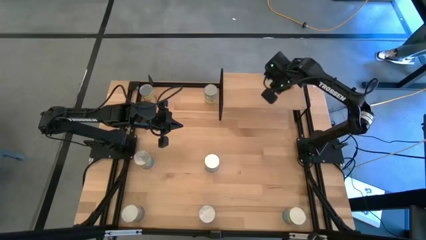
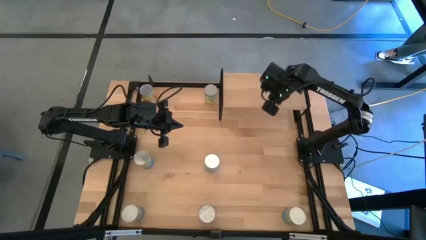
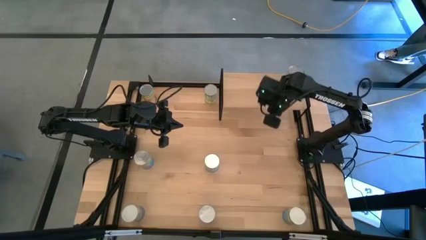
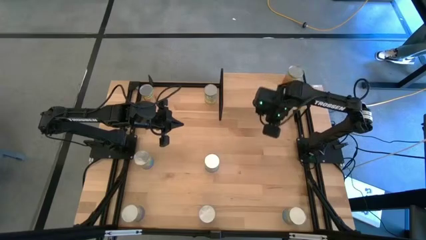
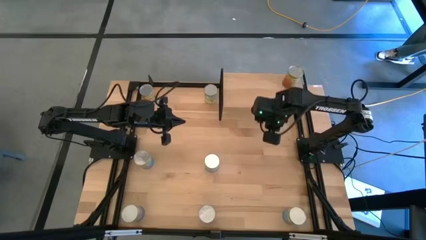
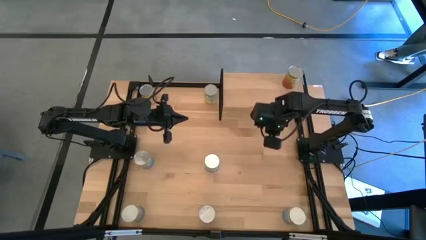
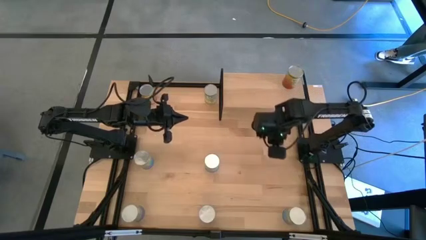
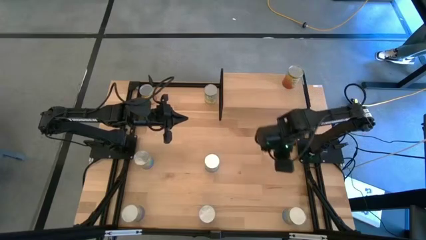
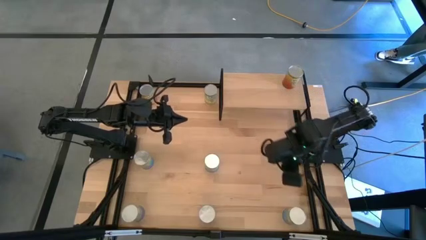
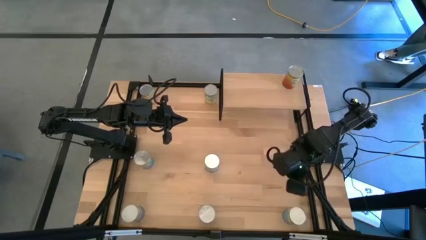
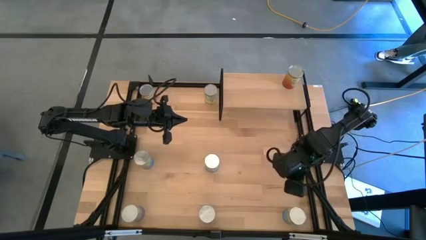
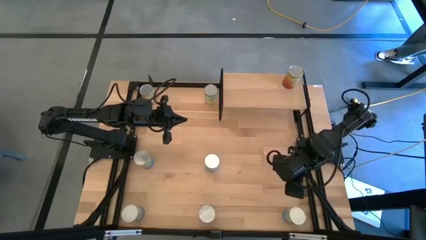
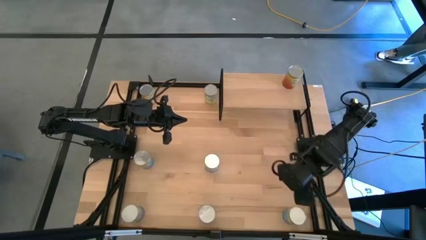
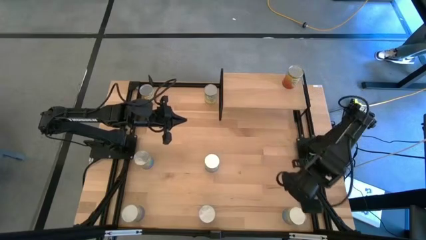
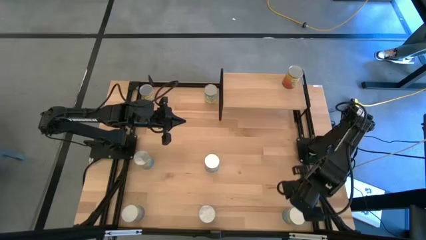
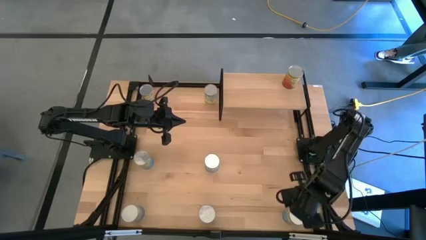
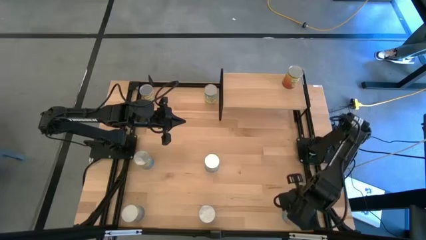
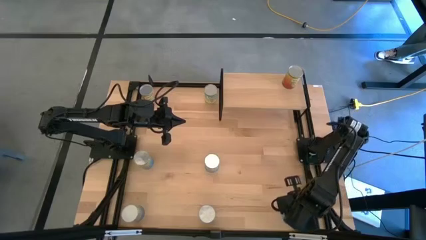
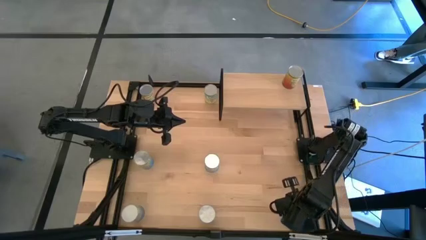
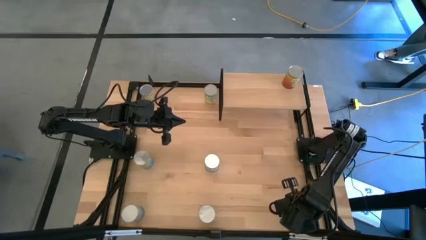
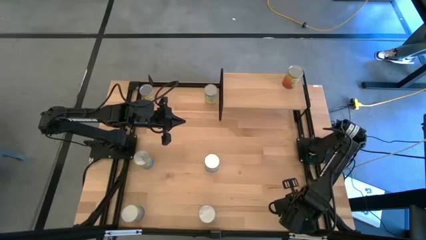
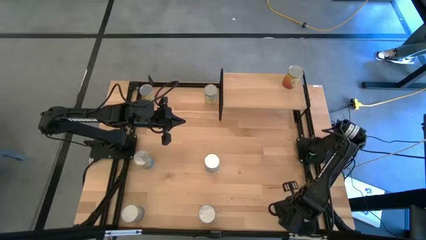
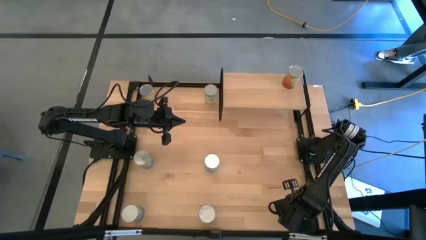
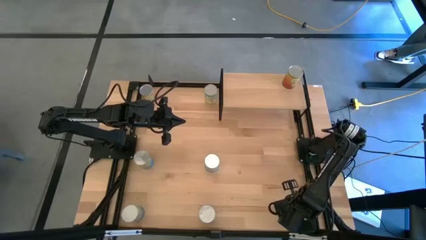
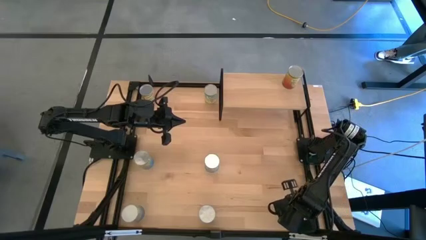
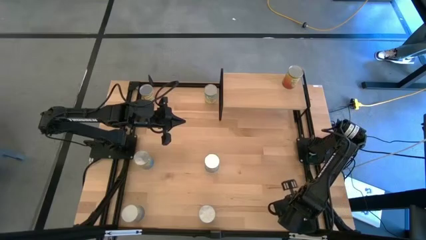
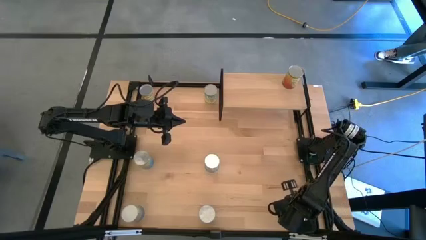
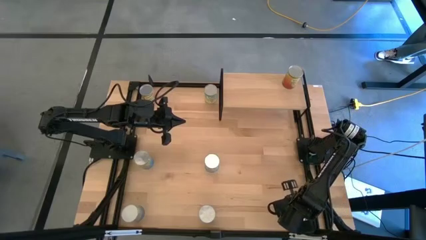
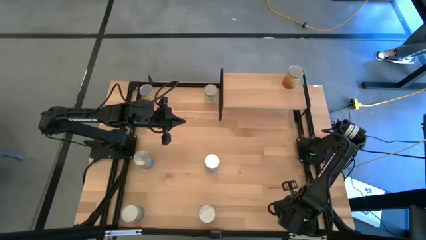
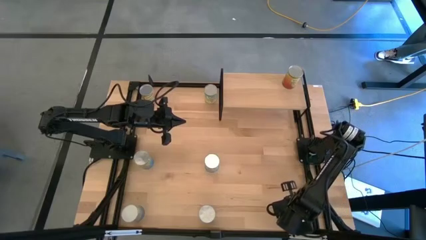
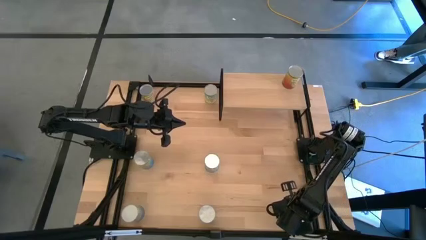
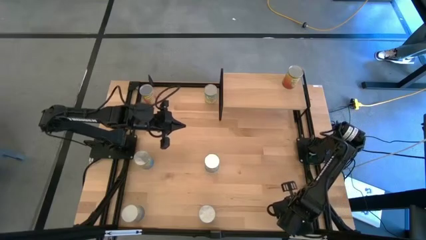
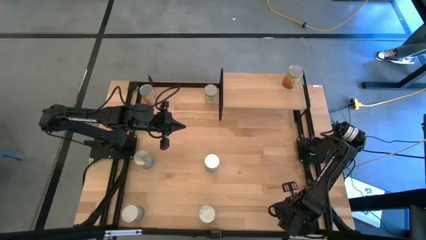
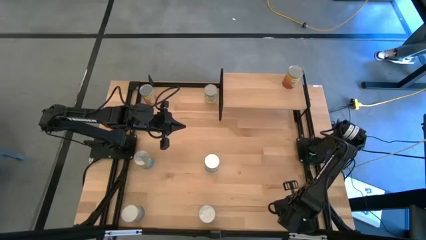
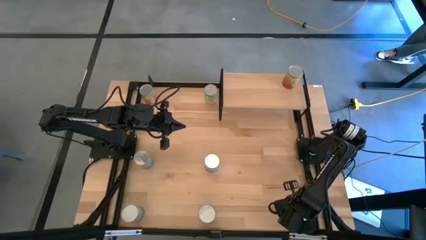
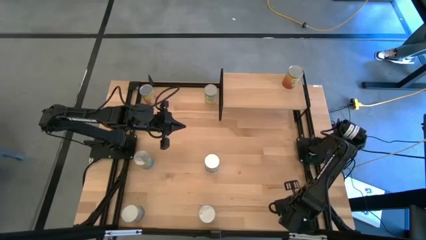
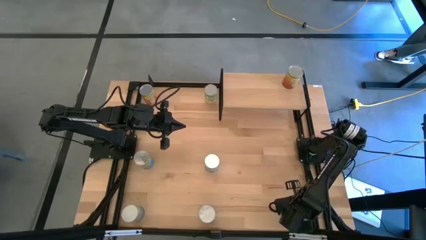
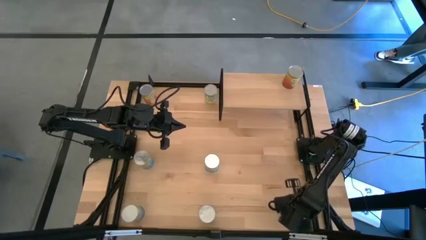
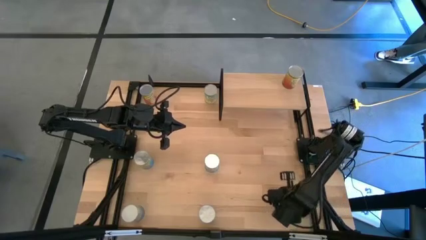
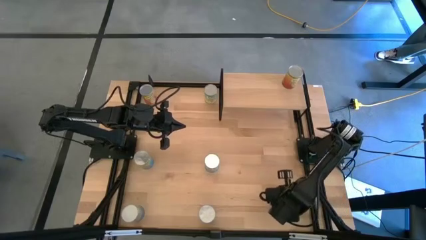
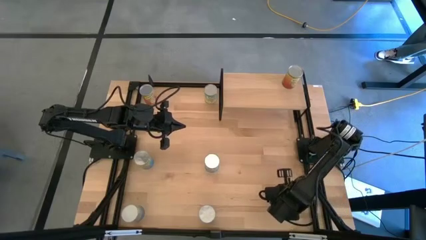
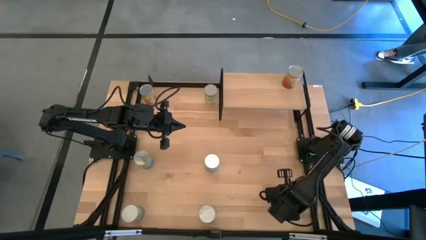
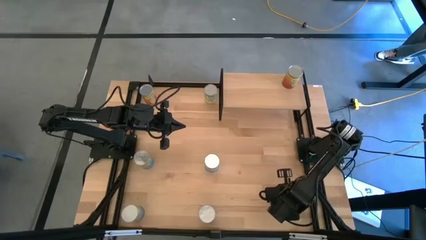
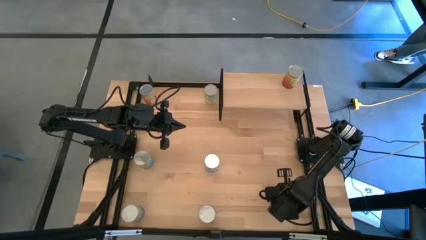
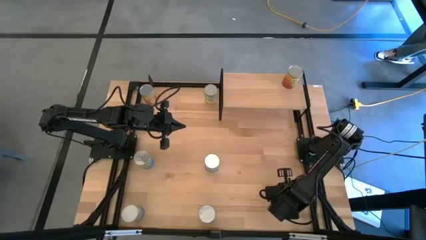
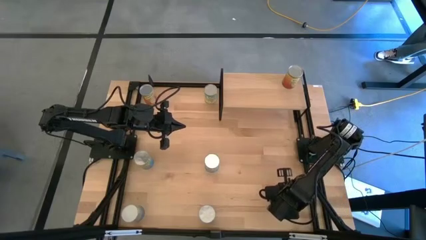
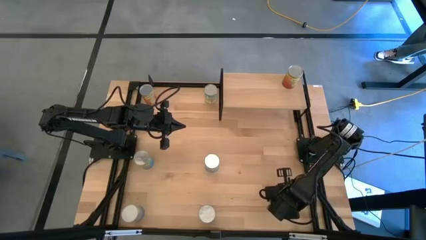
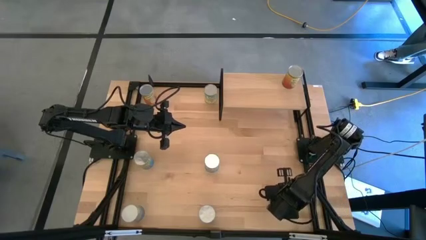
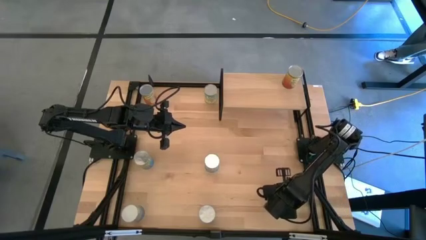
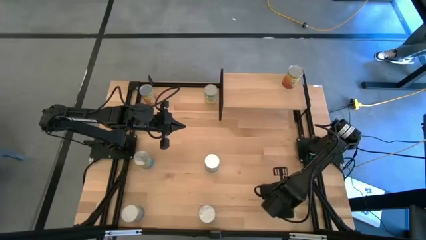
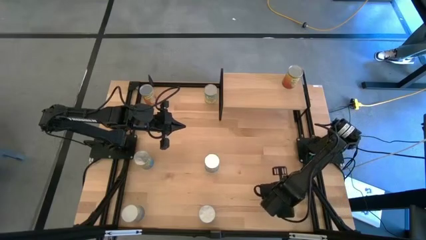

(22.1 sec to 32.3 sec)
Task: Pick and place cans onto a shelf
Put the canned tomatoes on the shelf

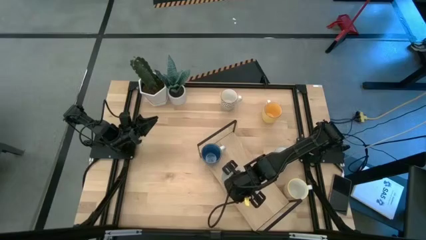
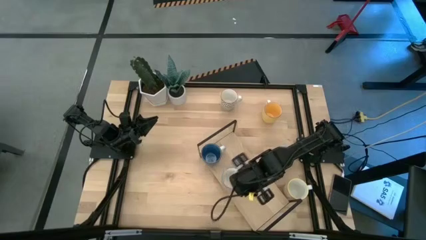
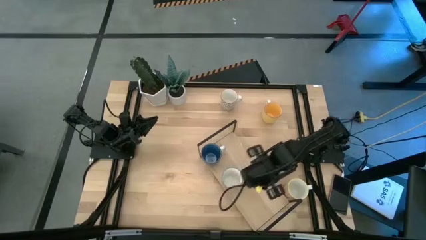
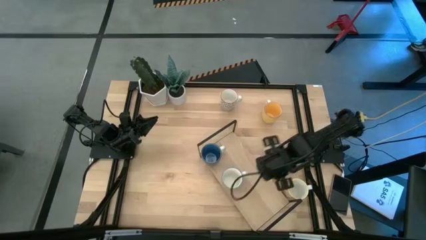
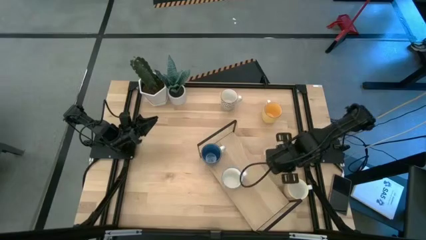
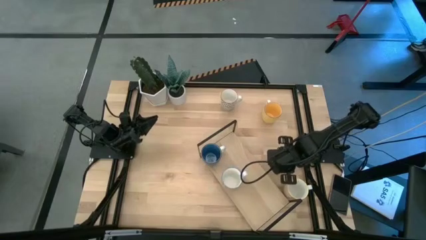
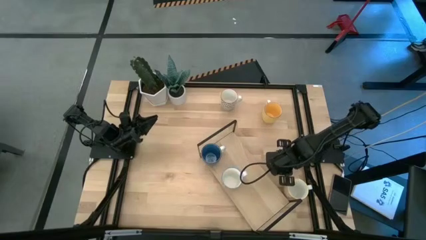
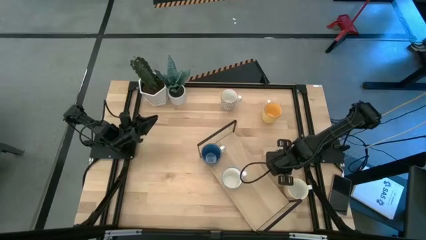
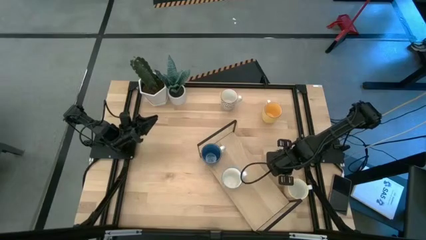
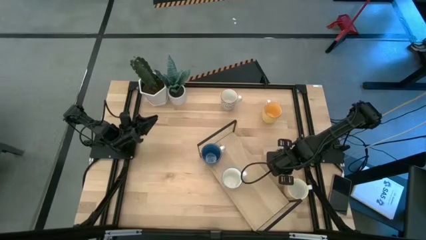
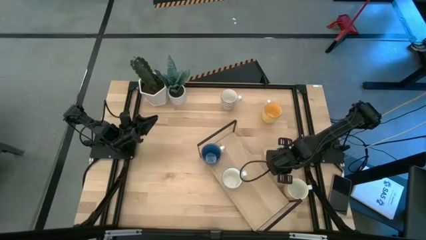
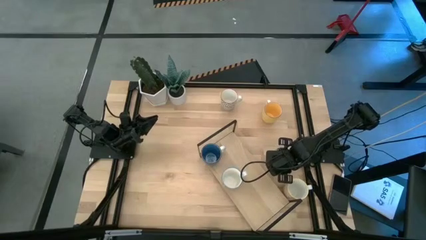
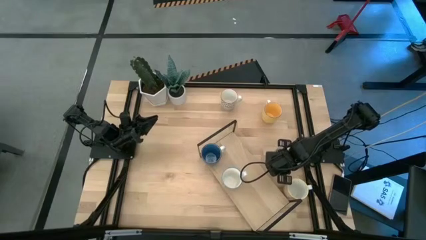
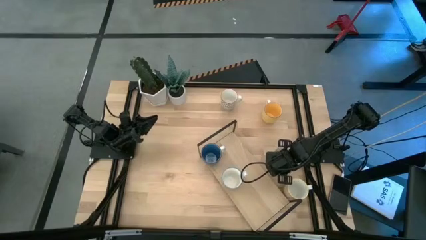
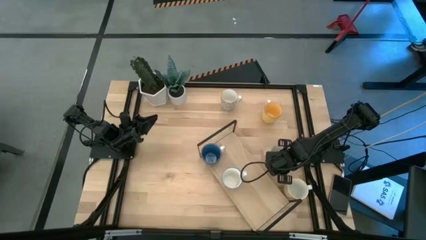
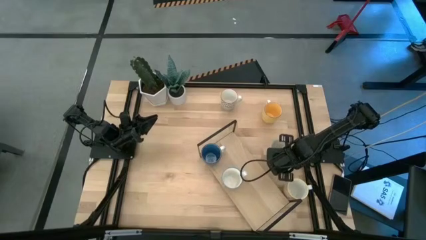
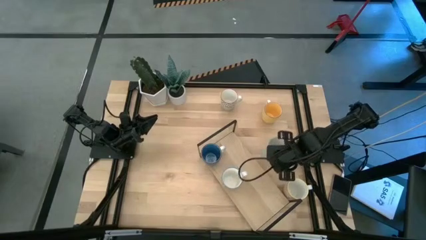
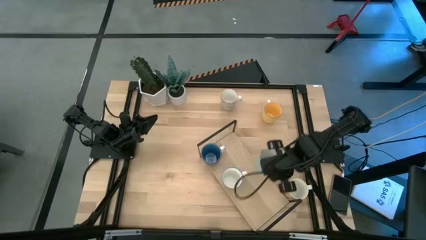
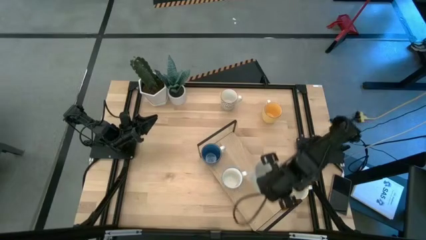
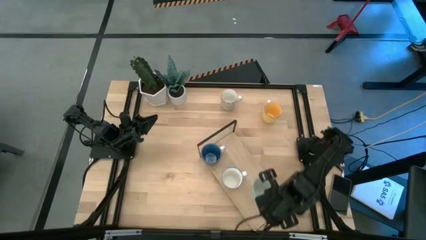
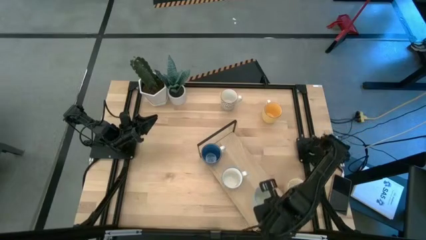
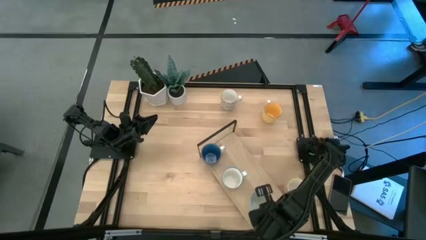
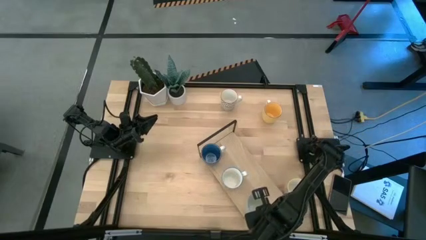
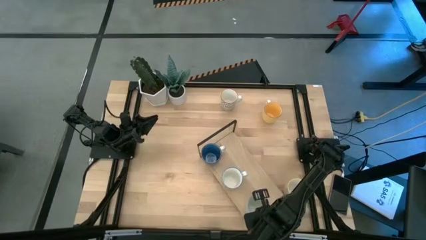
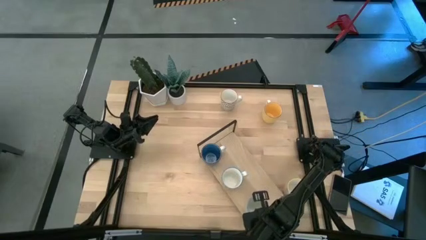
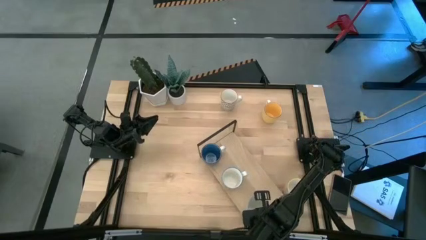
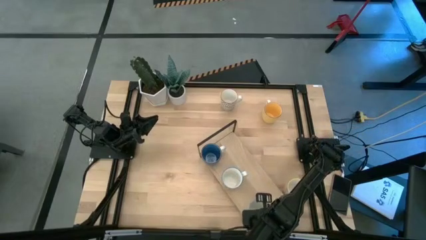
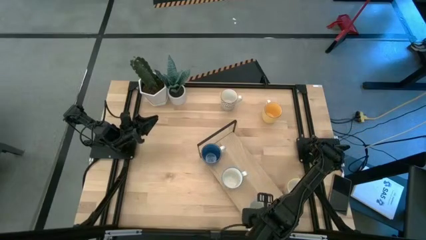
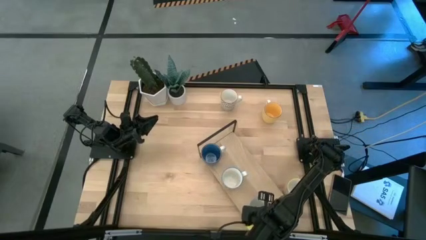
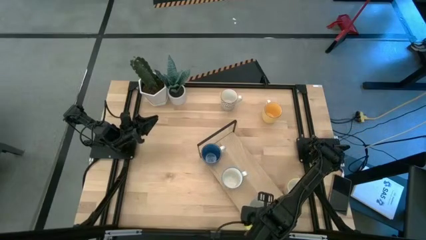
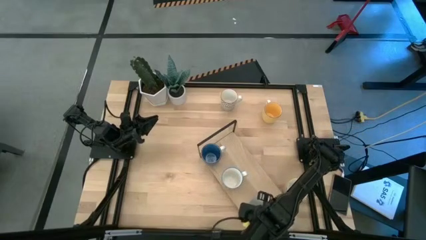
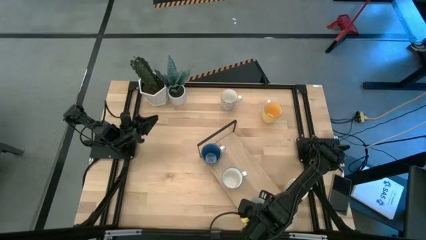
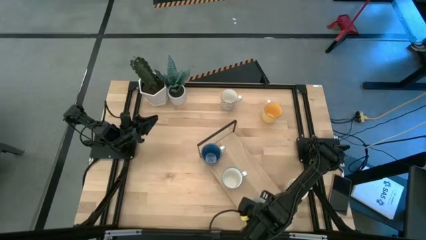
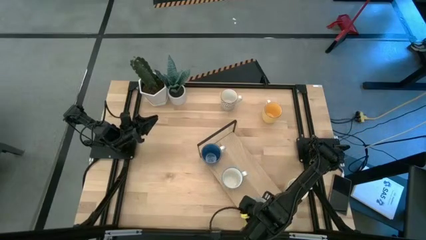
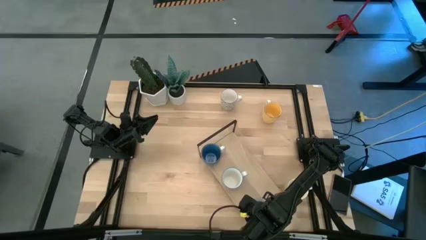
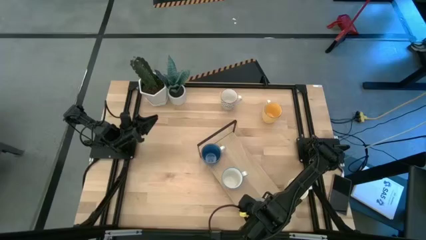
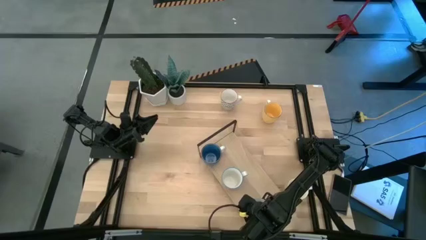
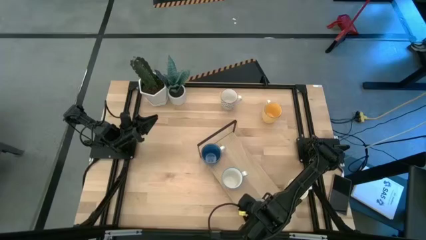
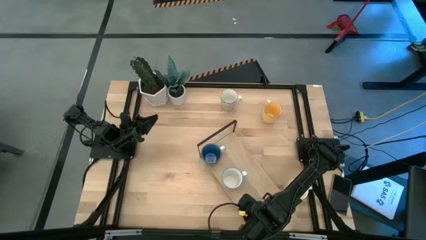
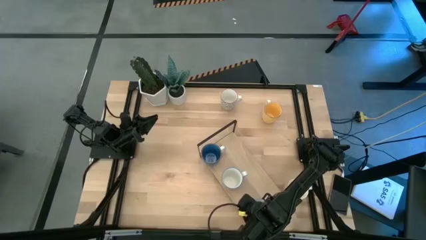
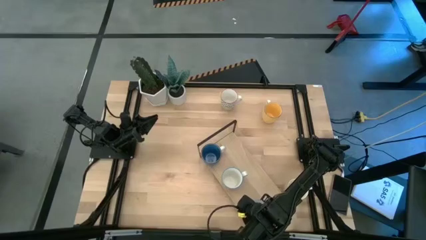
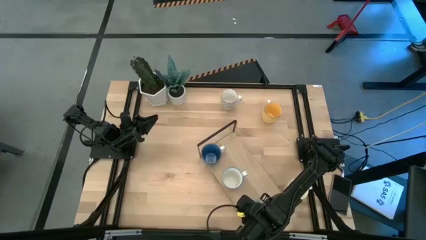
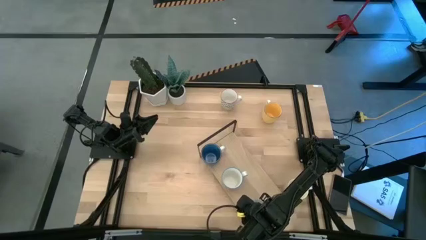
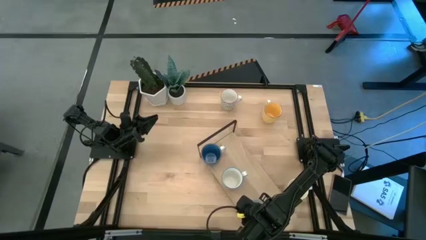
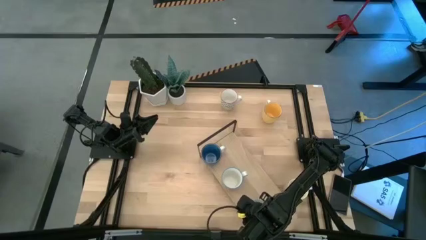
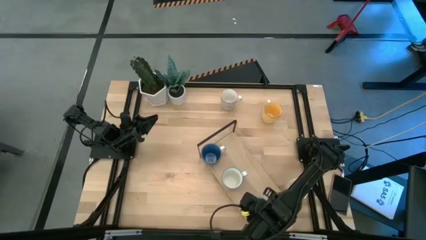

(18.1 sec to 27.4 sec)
Task: Place coffee mugs
Put the green patterned mug on the shelf
